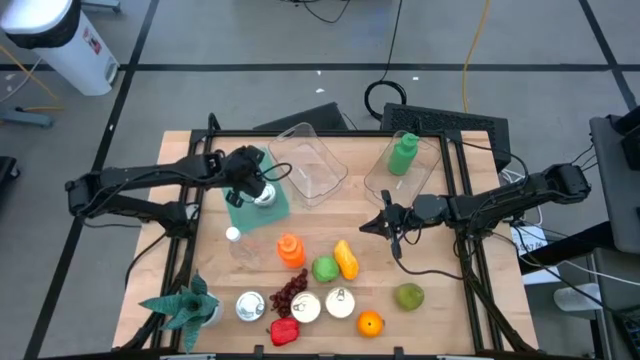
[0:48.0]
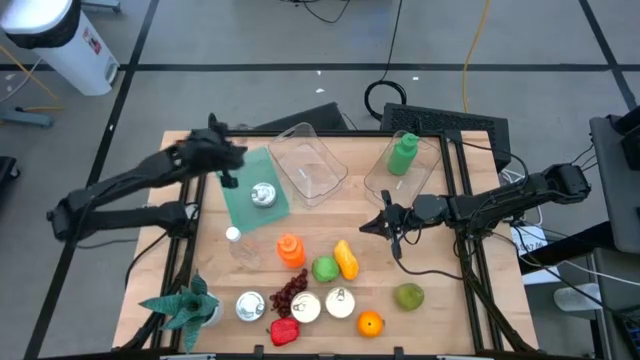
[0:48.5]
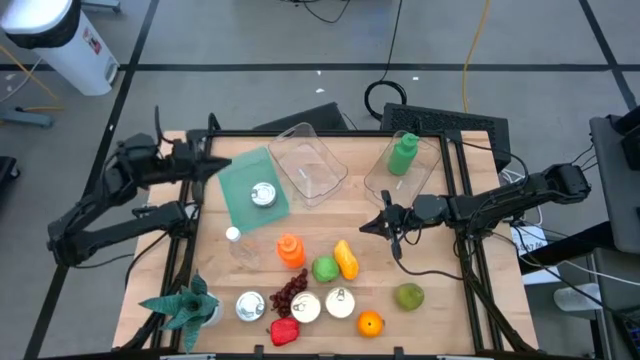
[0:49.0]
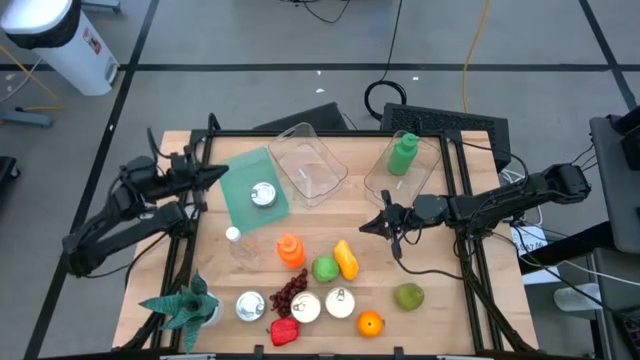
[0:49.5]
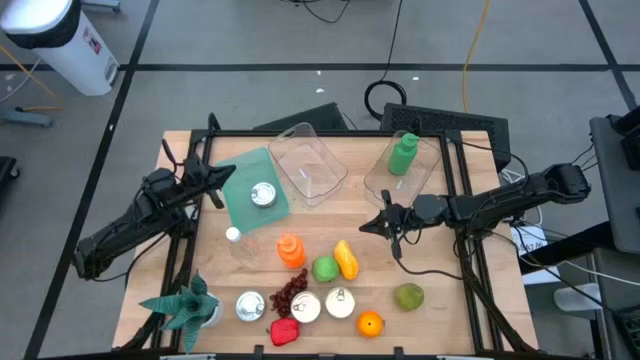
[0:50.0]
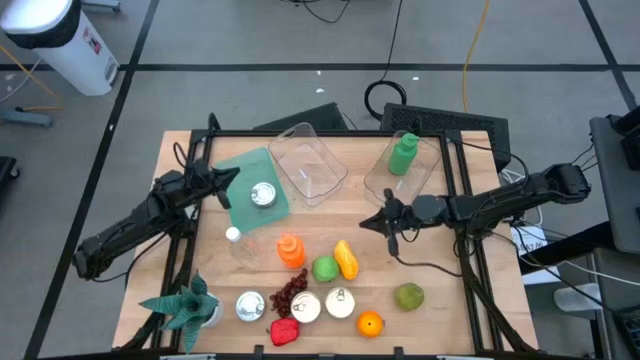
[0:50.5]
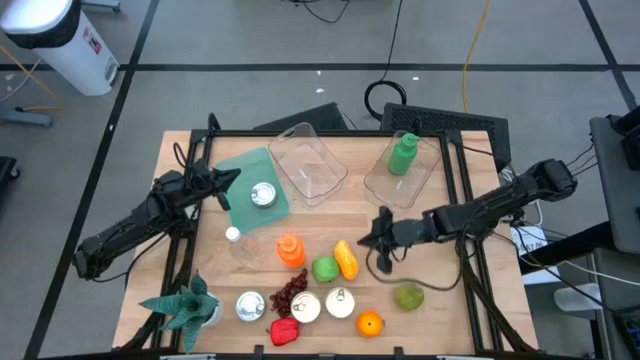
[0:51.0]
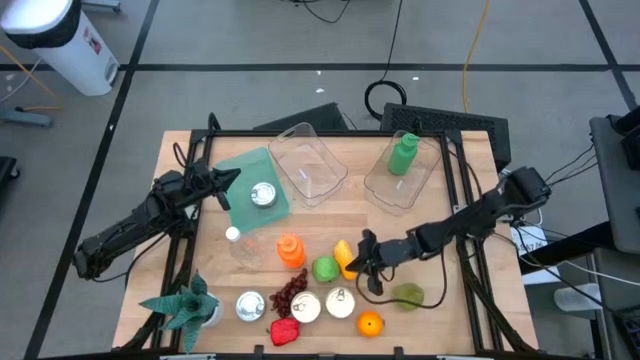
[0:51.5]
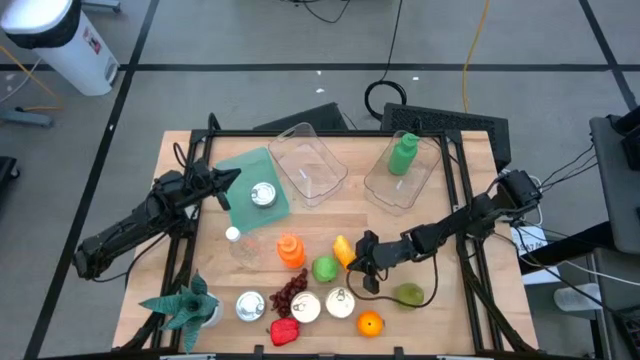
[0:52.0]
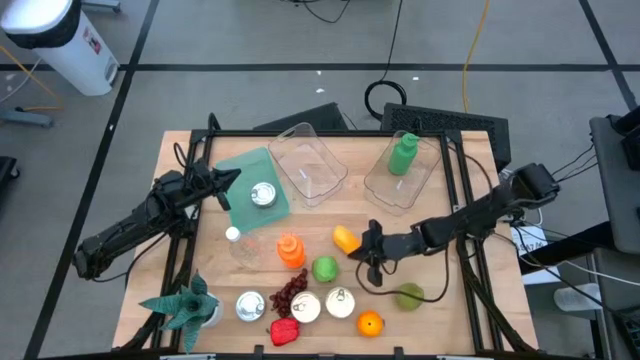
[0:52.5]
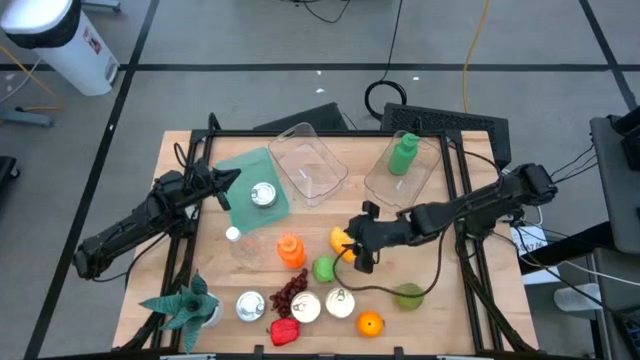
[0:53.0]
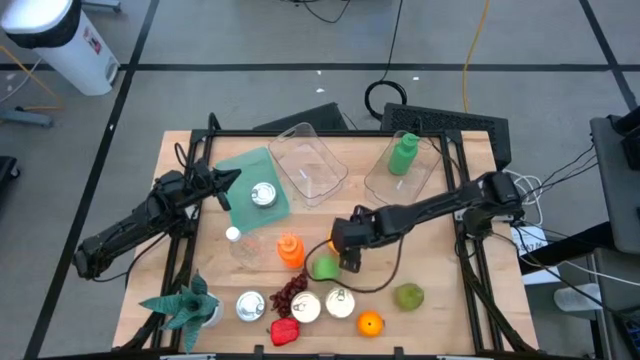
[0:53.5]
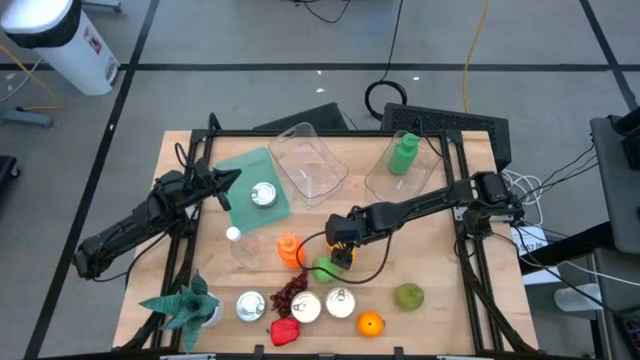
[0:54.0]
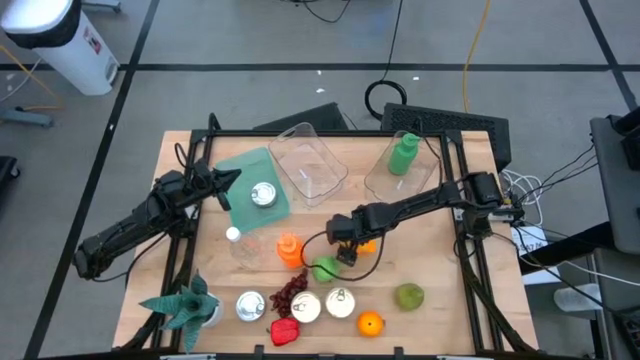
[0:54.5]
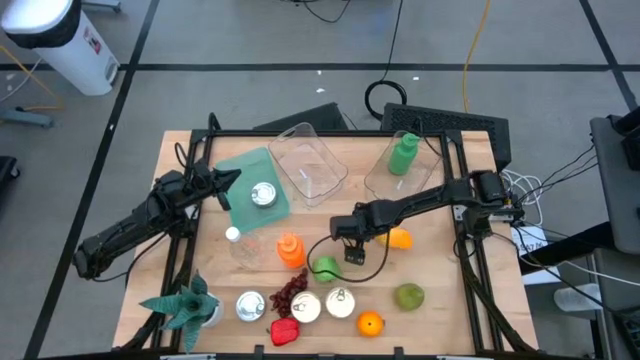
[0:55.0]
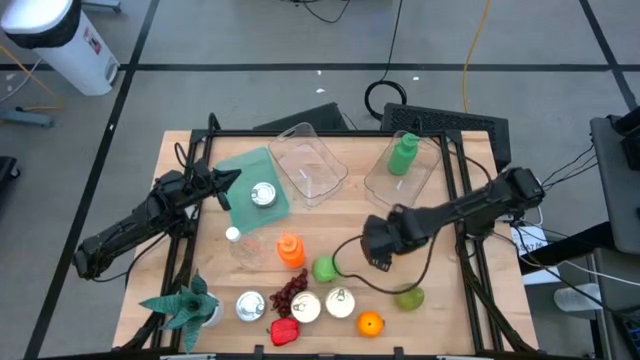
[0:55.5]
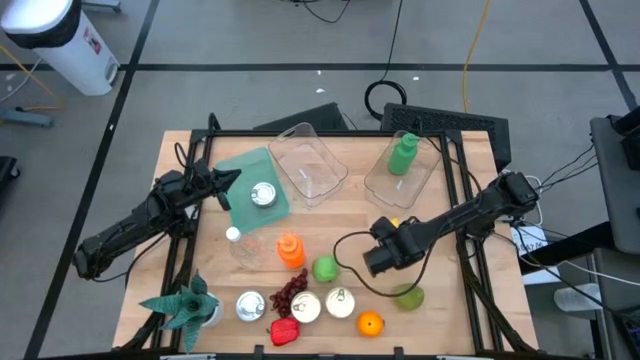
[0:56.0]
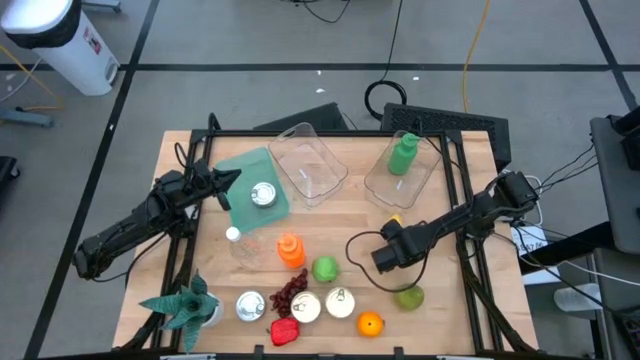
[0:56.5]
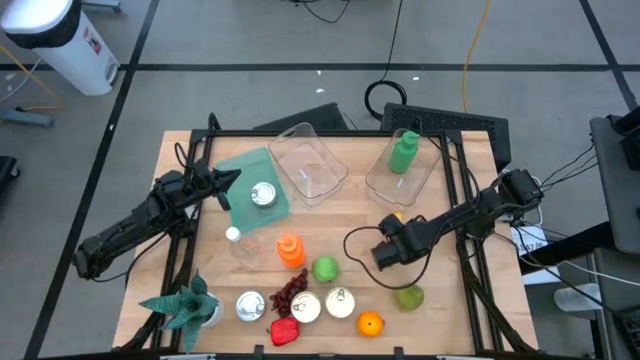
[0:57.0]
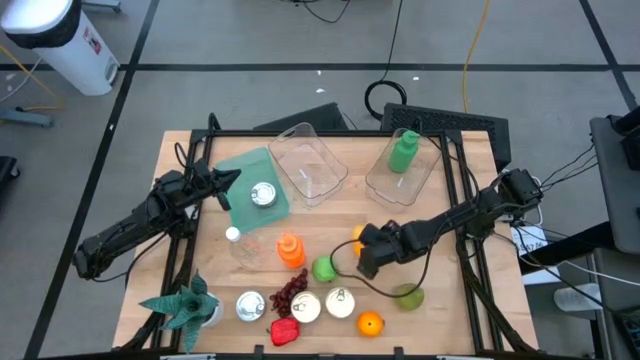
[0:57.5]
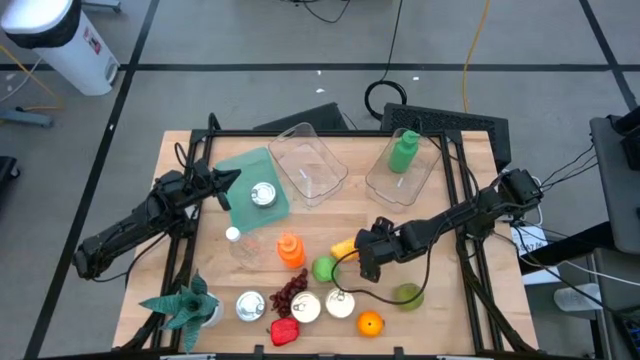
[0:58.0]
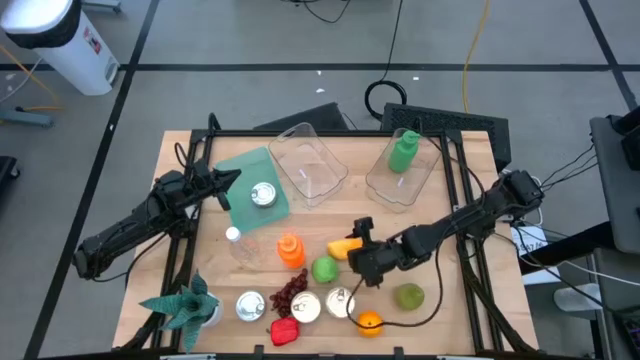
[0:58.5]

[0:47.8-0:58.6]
Task: Pick & Place Food Item
Put the mango into the left transparent bin

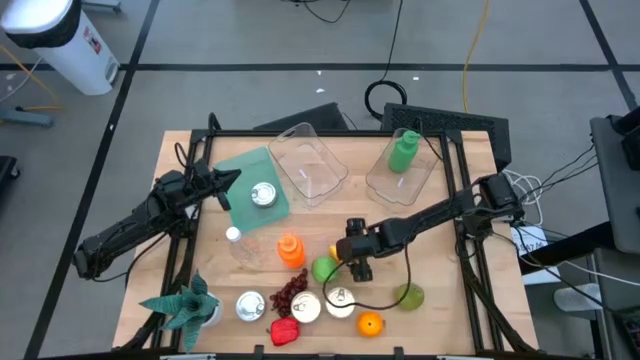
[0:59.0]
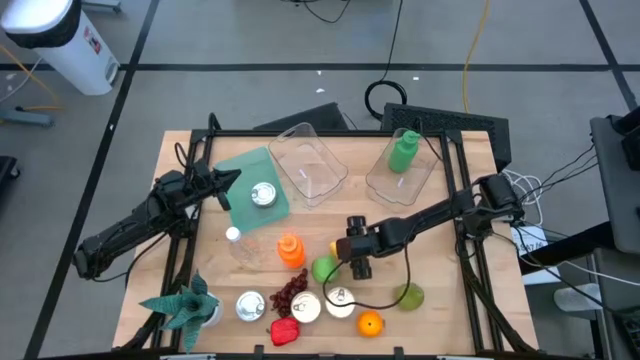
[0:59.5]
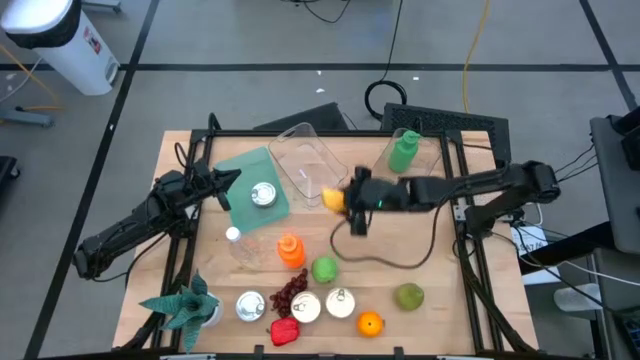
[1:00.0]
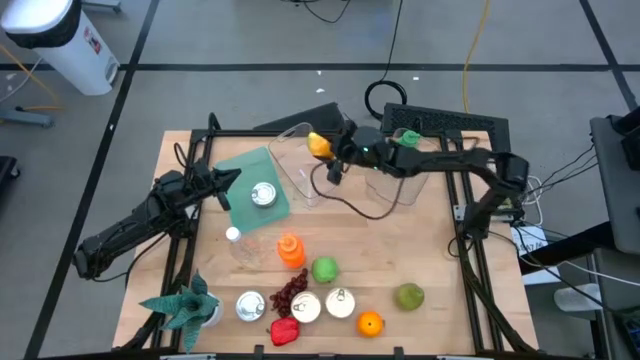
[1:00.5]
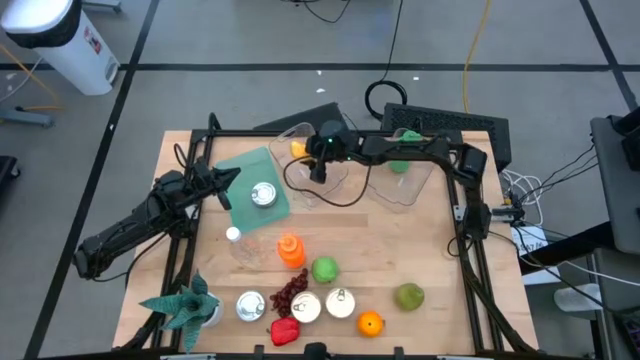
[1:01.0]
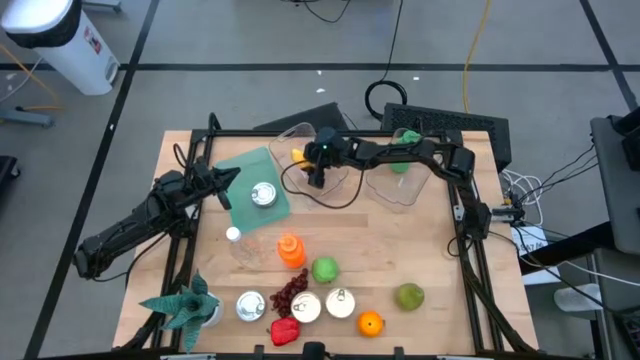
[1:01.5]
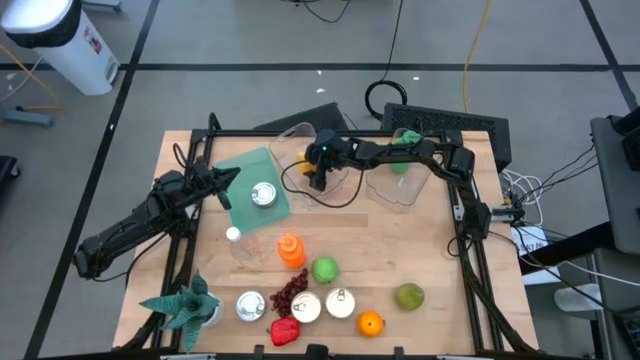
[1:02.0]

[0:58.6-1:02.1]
Put the mango into the left transparent bin

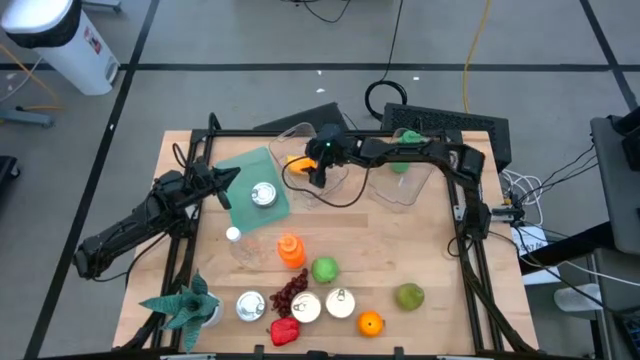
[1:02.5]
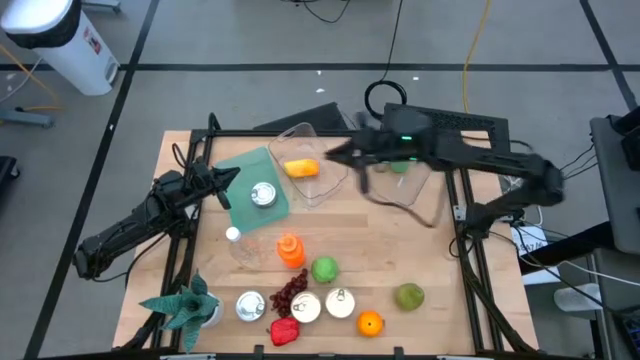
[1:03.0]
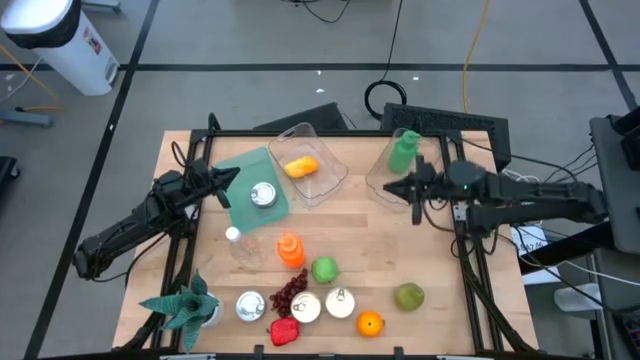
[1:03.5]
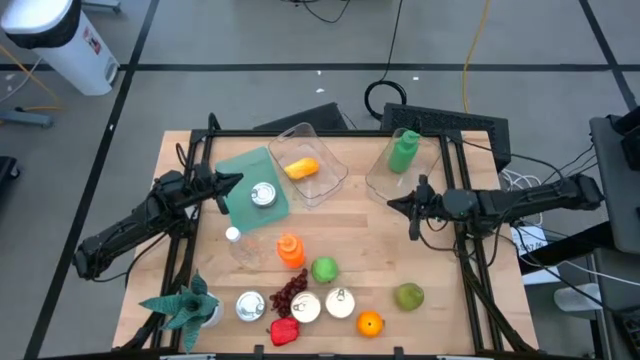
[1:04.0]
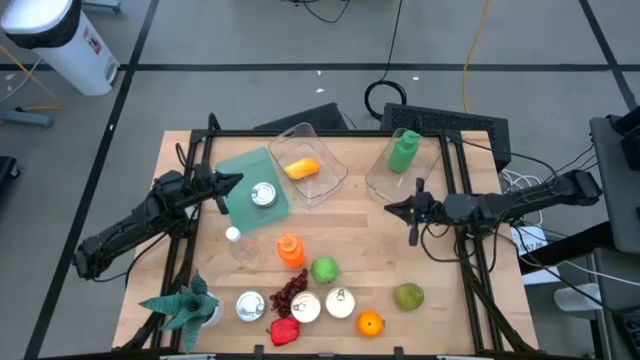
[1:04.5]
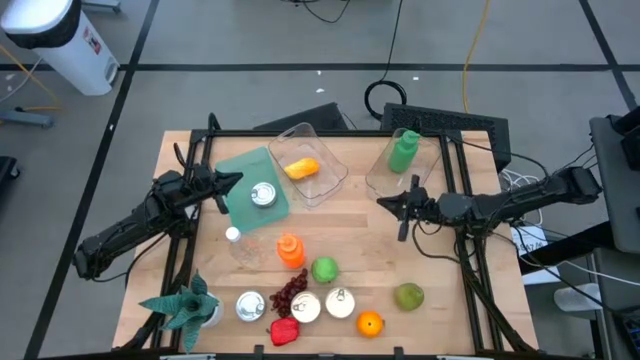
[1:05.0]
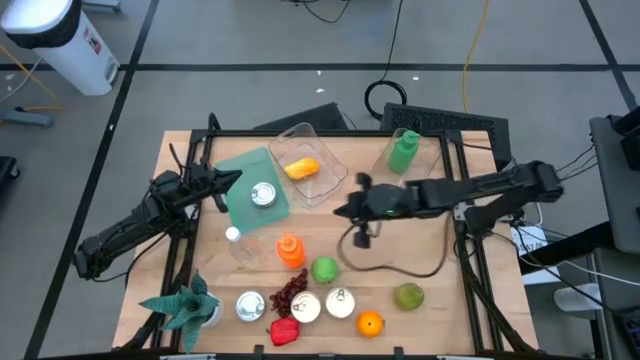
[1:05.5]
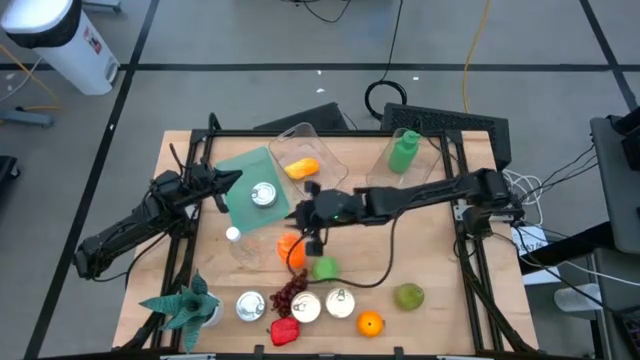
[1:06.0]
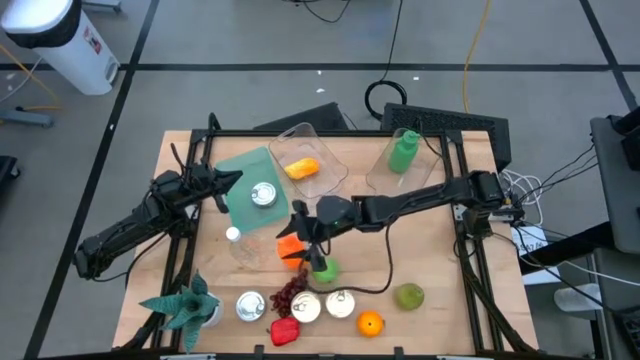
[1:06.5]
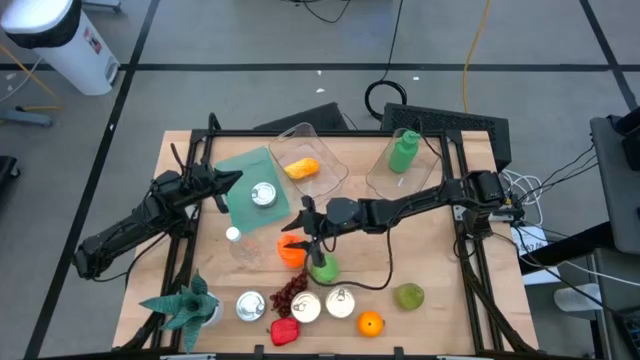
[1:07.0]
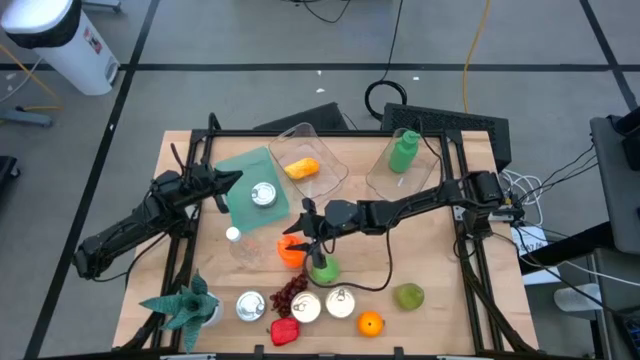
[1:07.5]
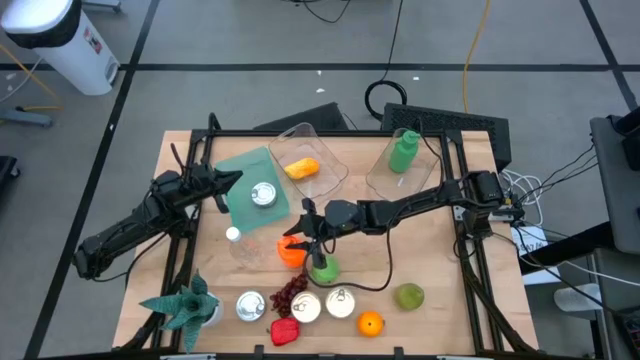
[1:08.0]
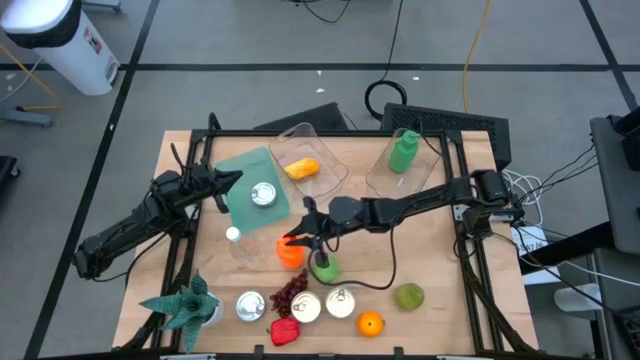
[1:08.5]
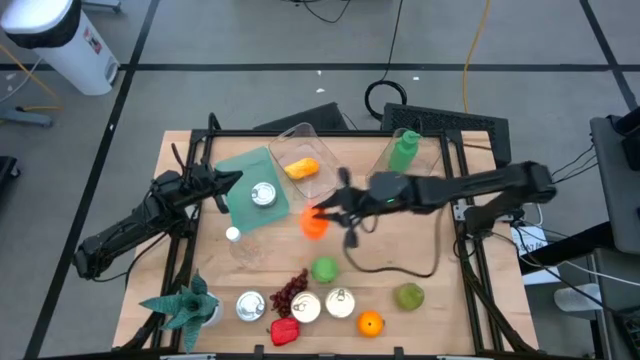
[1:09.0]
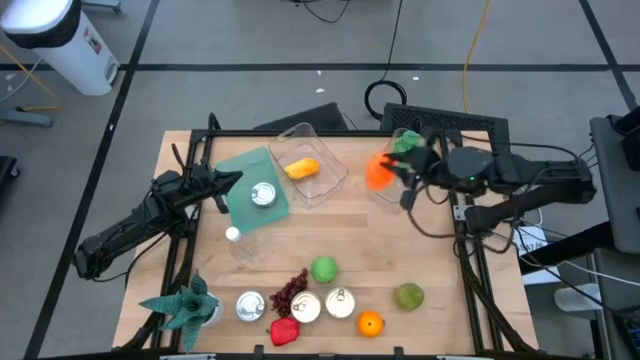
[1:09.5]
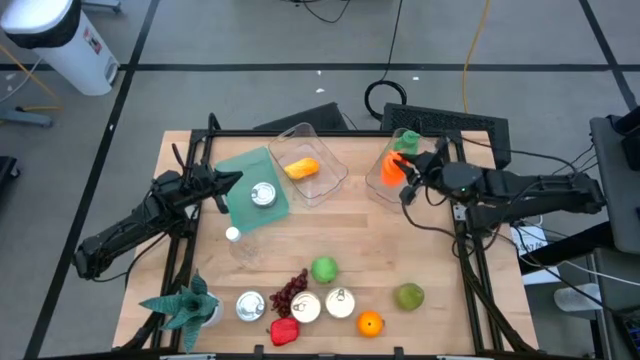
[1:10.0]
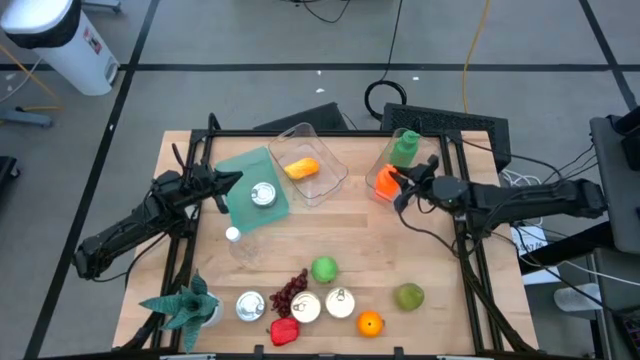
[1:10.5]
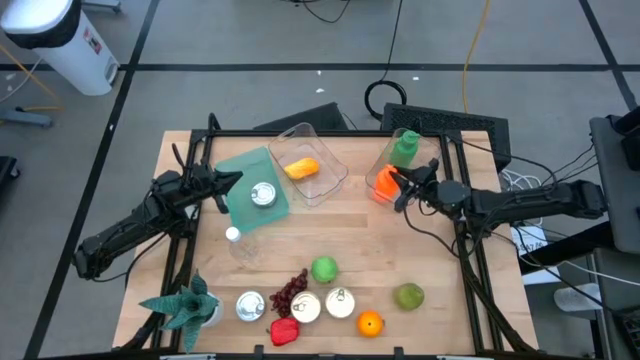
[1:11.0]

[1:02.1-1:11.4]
Put the orange bottle into the right transparent bin
